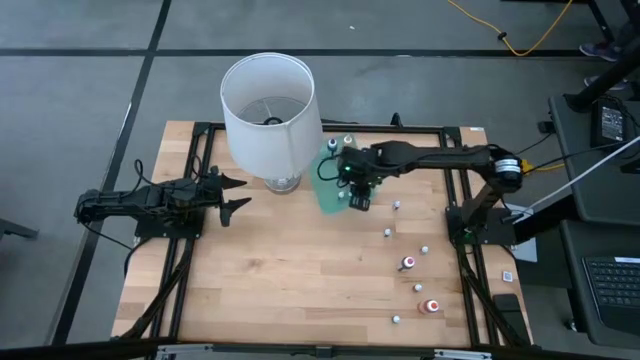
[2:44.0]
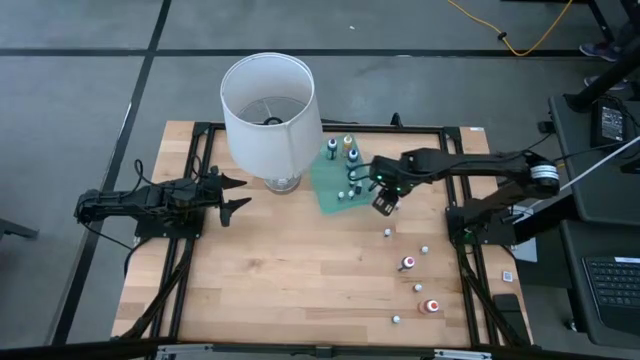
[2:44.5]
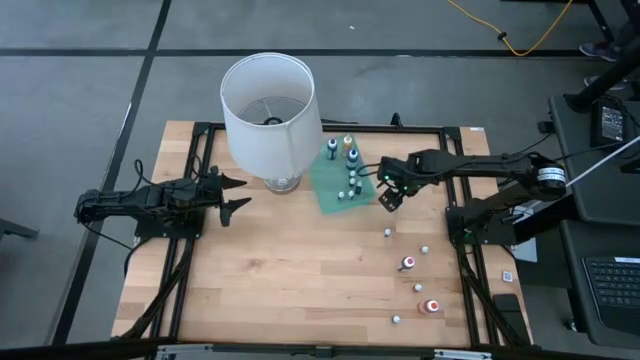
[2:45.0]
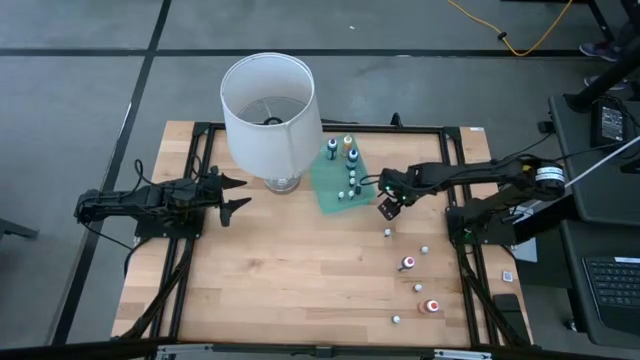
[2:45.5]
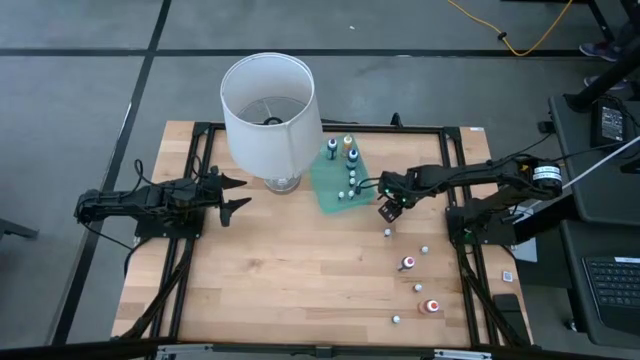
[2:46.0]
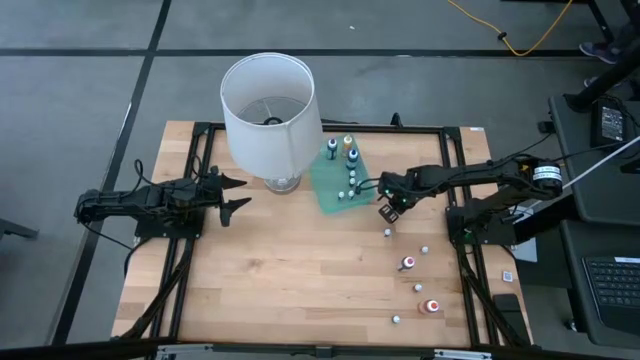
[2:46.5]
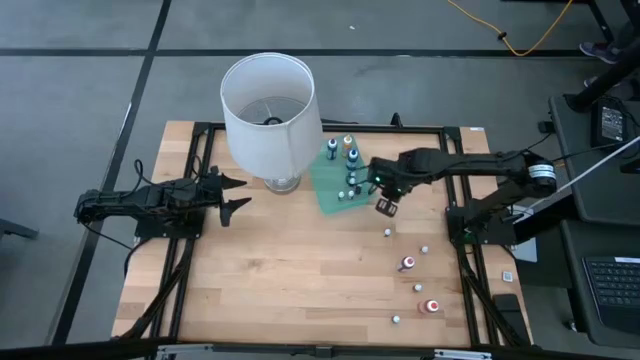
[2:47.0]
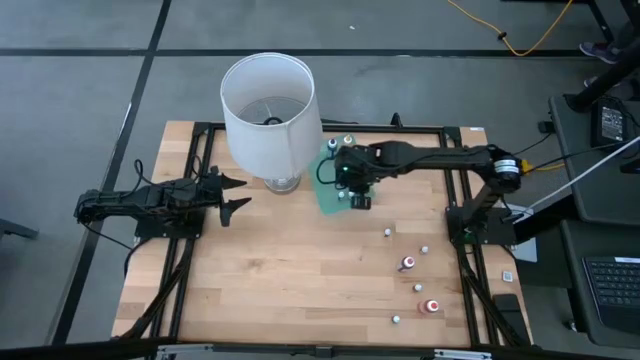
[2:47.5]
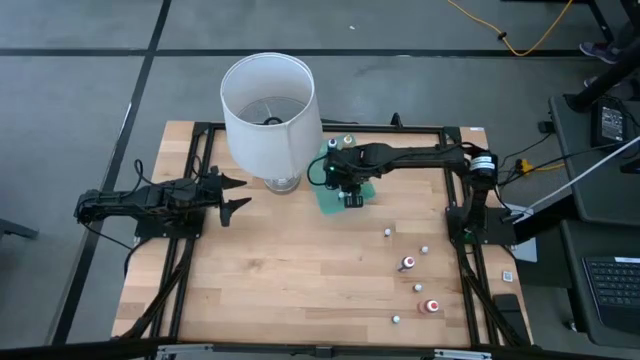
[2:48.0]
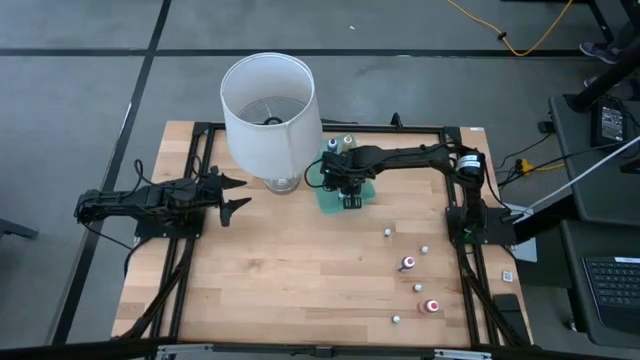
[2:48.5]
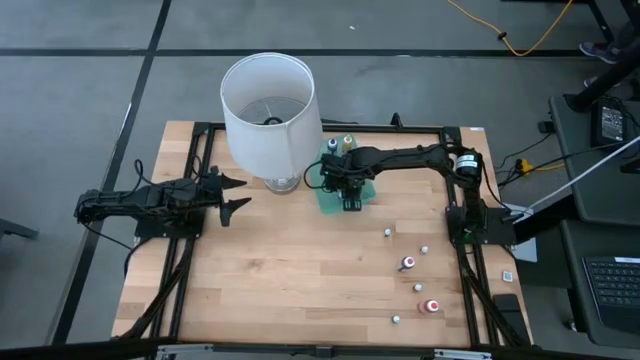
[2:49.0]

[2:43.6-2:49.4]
Task: Pick & Place food coloring
Put the small violet food coloring bottle into the green bin

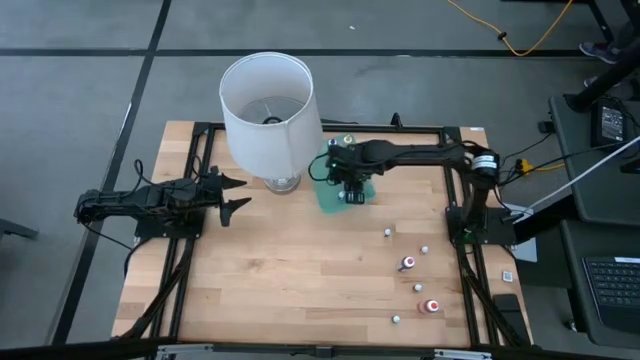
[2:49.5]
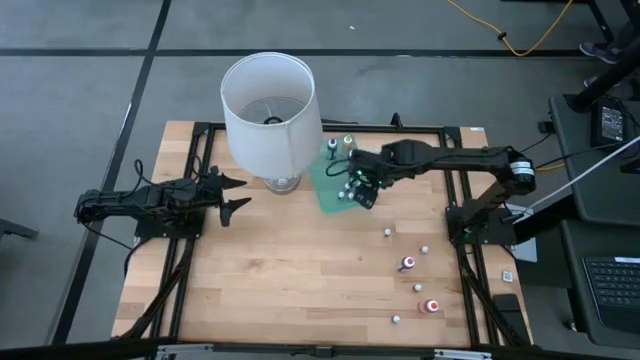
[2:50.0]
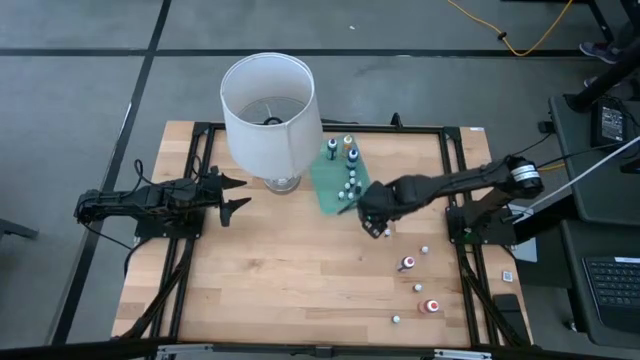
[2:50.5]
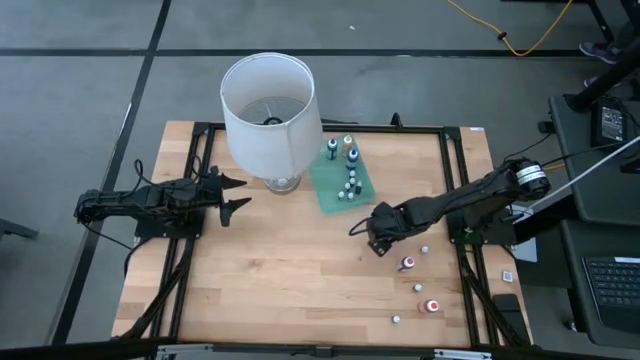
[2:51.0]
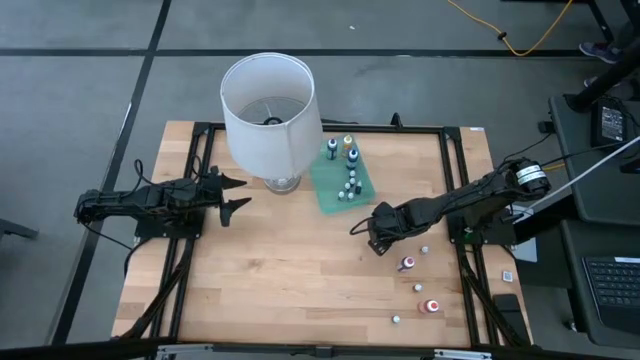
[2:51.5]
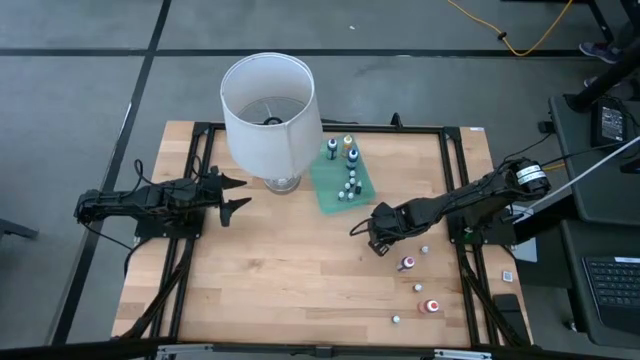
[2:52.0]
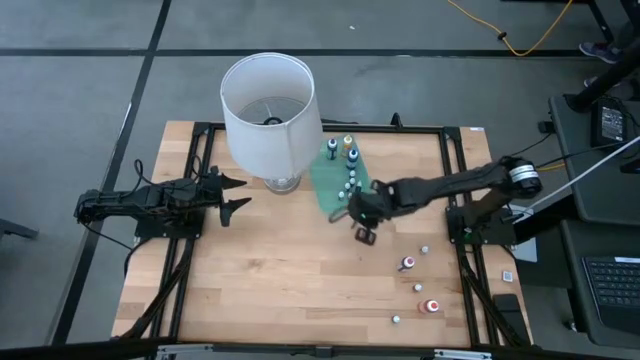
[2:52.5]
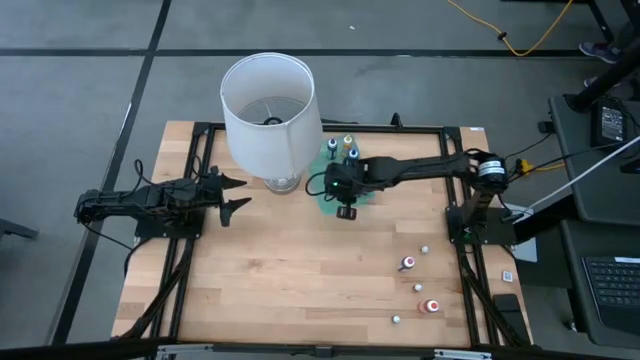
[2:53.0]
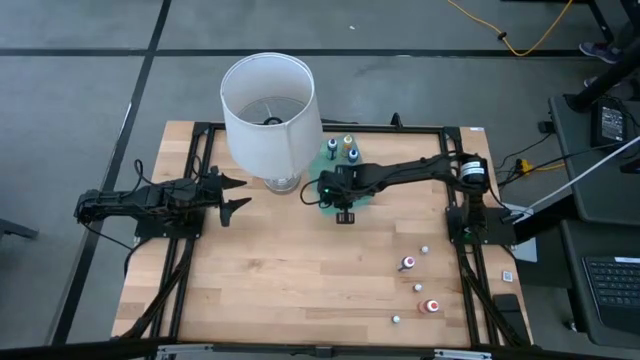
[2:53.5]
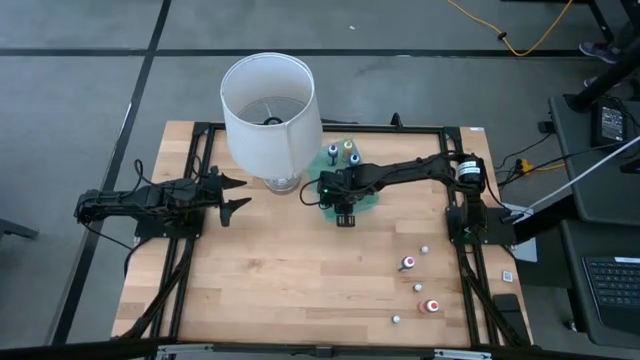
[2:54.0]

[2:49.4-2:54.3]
Put the top small red food coloring bottle into the green bin

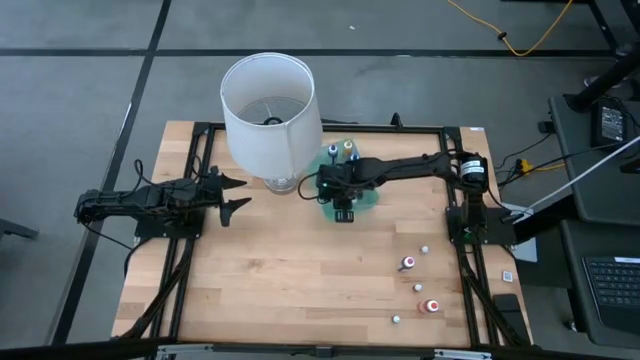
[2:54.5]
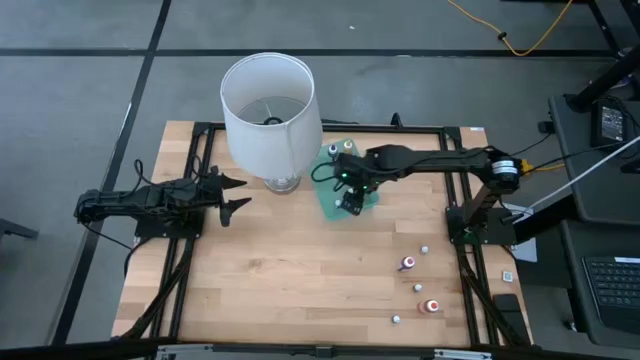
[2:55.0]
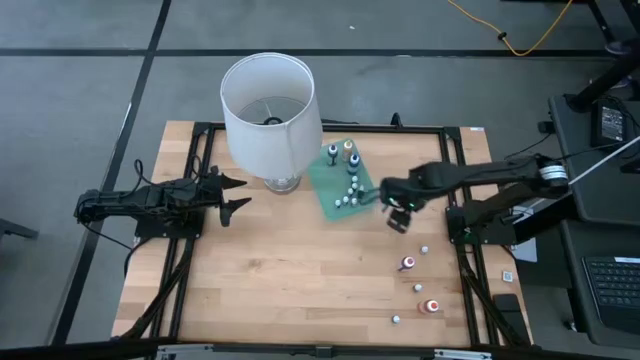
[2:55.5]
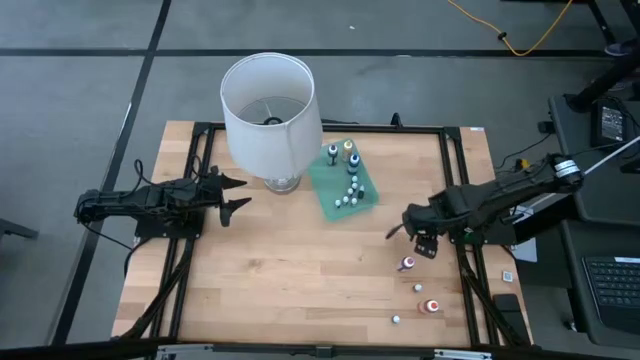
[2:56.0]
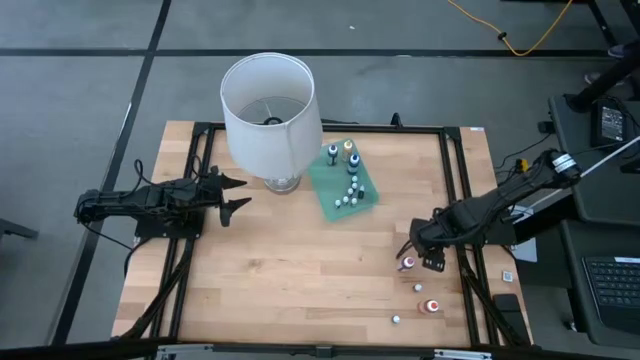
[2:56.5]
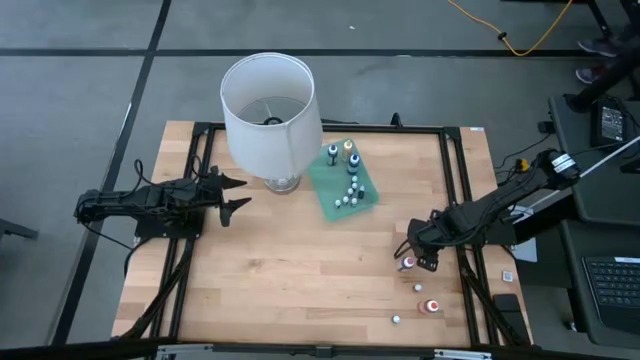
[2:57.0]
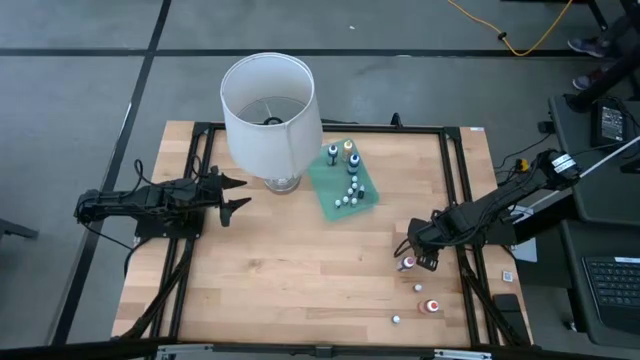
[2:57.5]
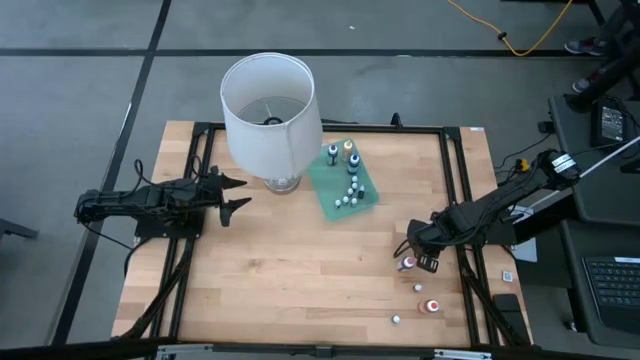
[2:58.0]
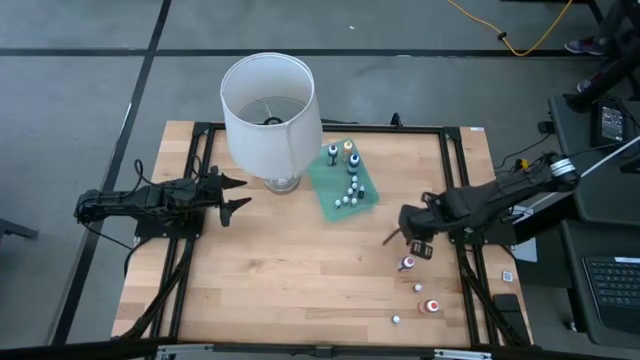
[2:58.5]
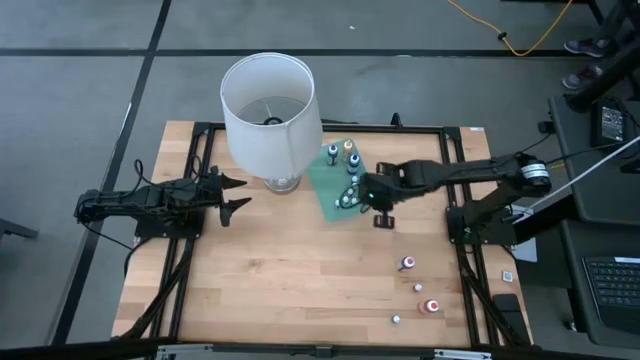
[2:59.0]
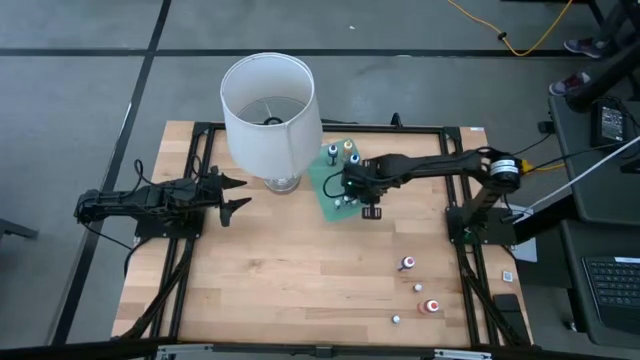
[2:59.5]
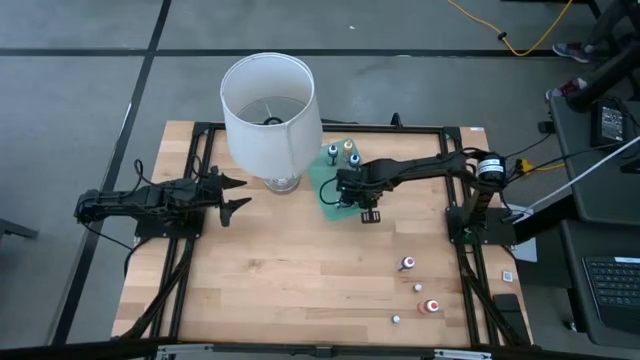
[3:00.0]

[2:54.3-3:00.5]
Put the small orange food coloring bottle into the green bin

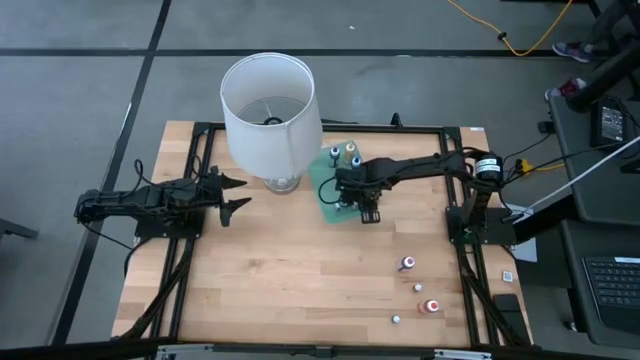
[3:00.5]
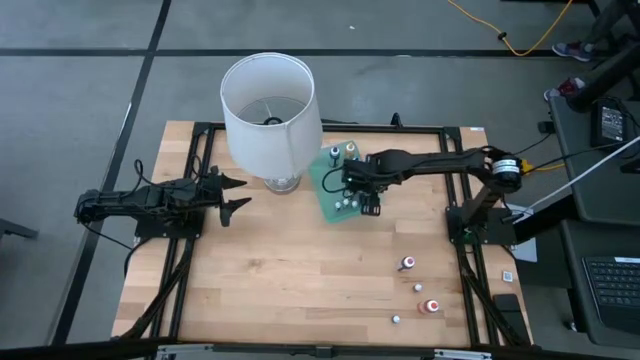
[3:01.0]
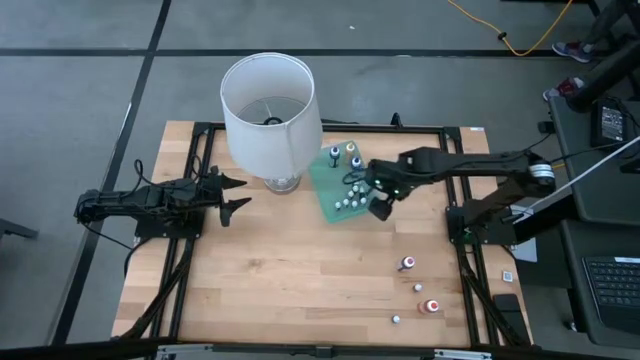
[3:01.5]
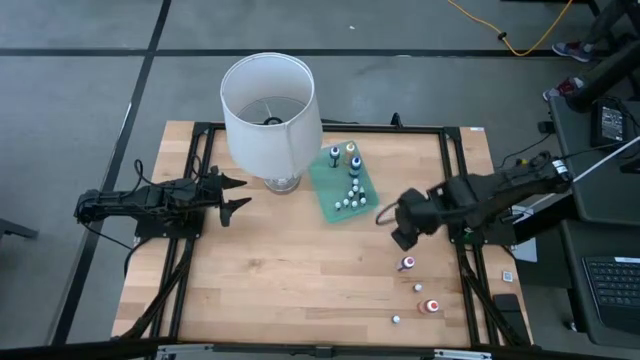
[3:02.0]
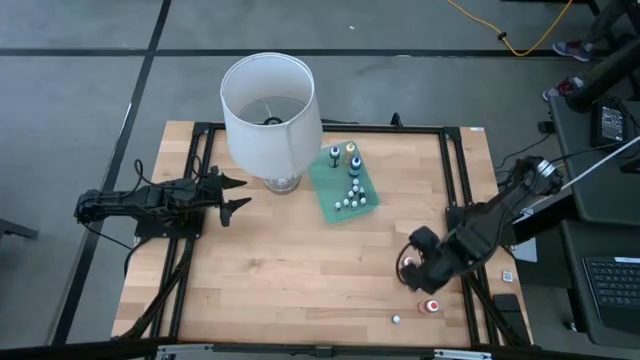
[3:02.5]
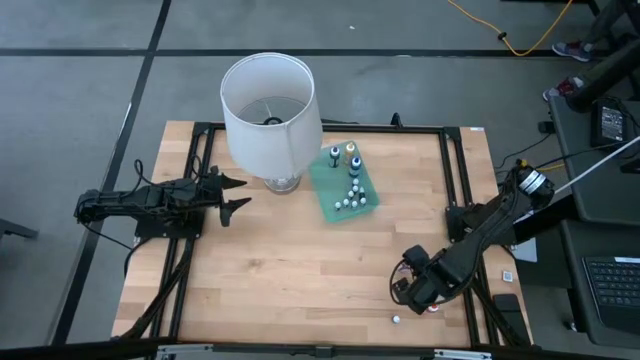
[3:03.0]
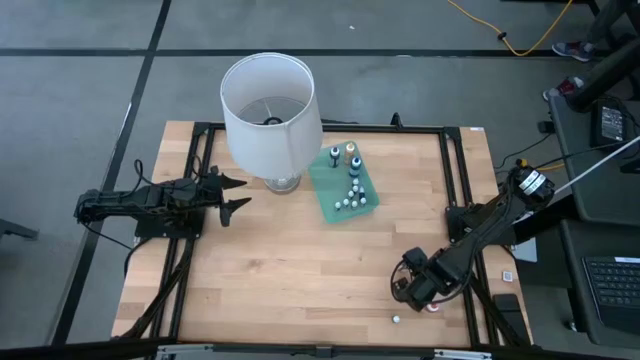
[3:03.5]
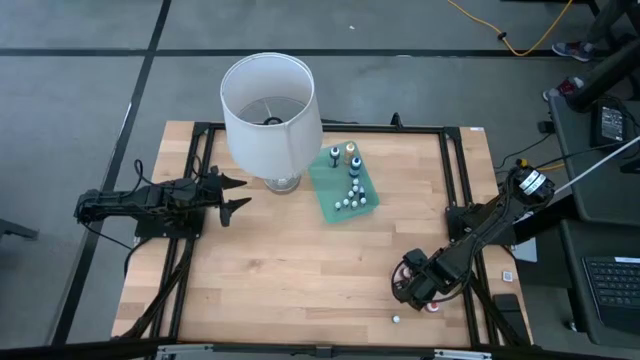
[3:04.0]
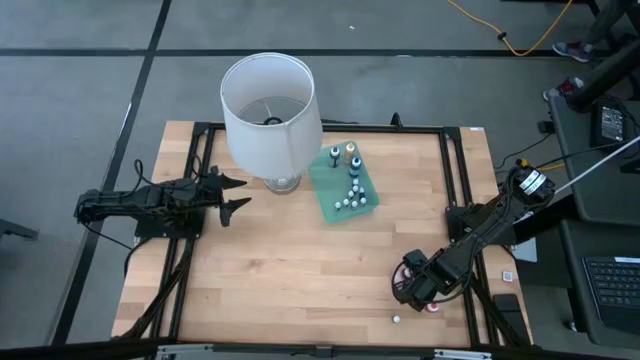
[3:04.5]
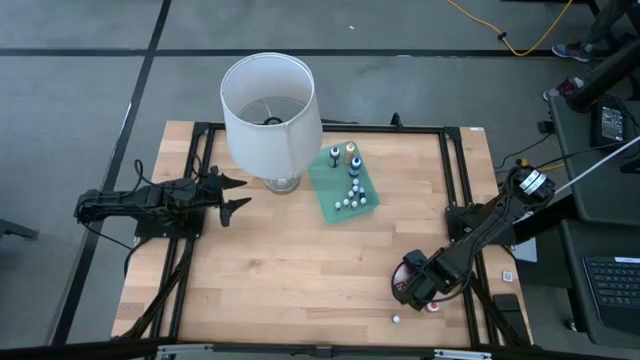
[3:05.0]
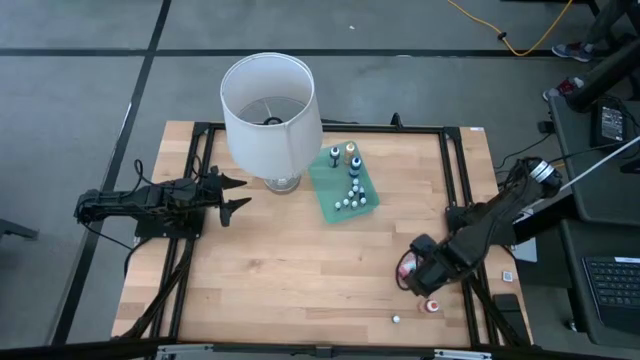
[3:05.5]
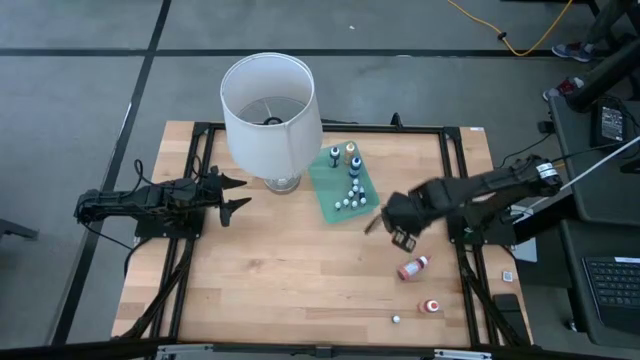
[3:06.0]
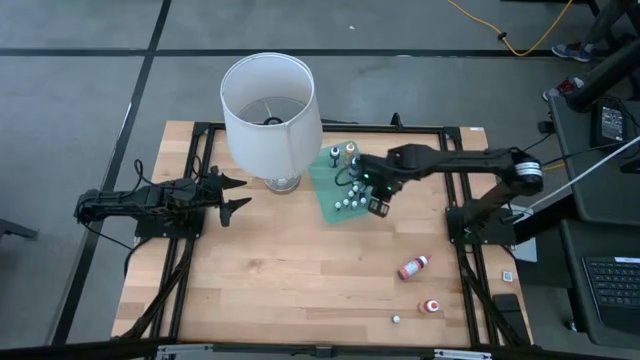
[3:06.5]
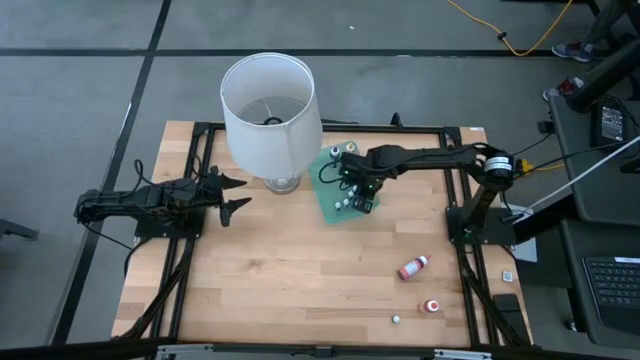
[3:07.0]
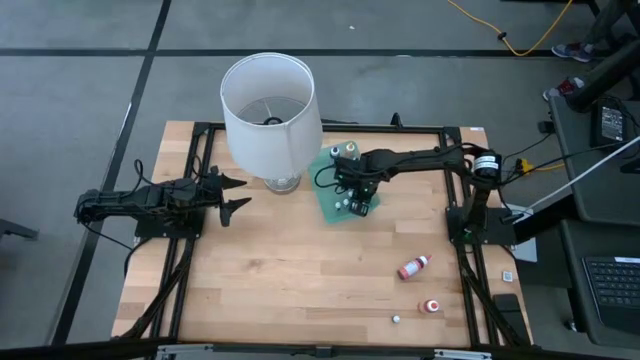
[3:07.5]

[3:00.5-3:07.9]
Put the small red food coloring bottle into the green bin
